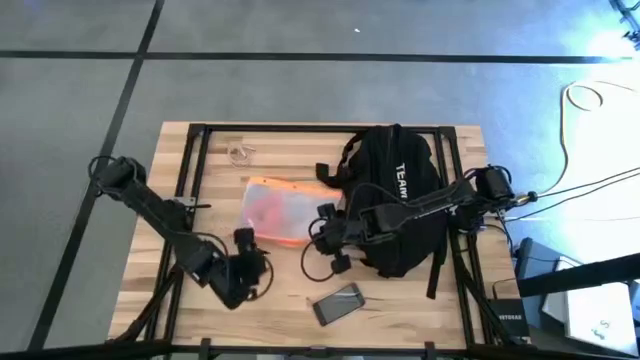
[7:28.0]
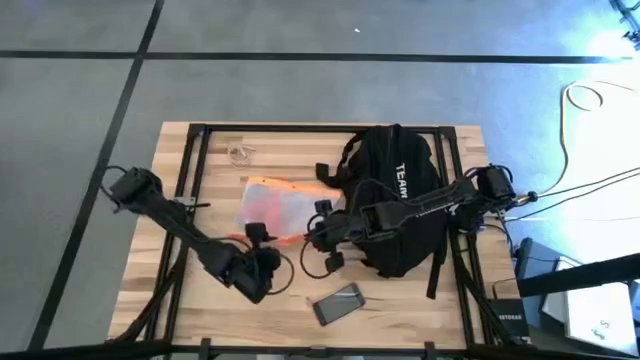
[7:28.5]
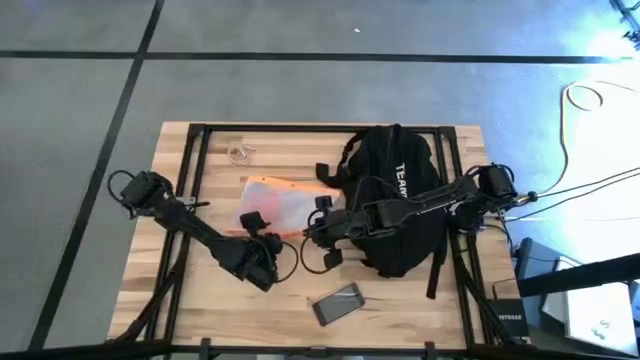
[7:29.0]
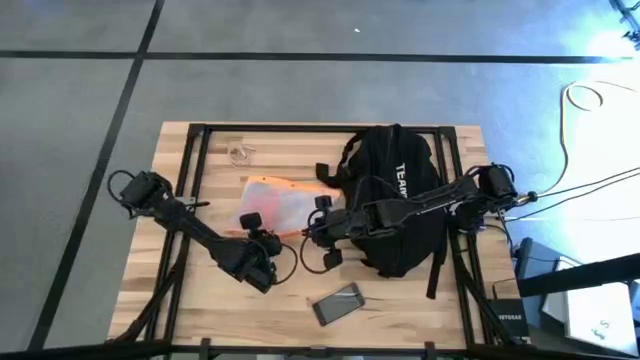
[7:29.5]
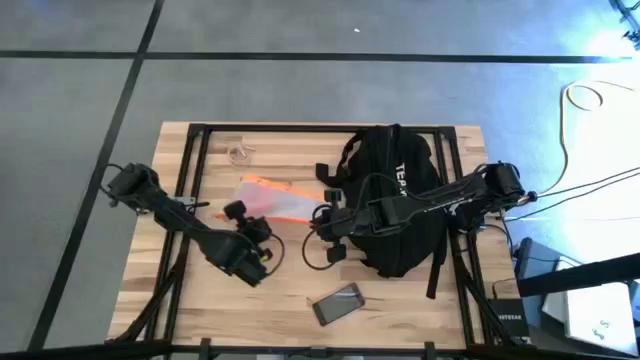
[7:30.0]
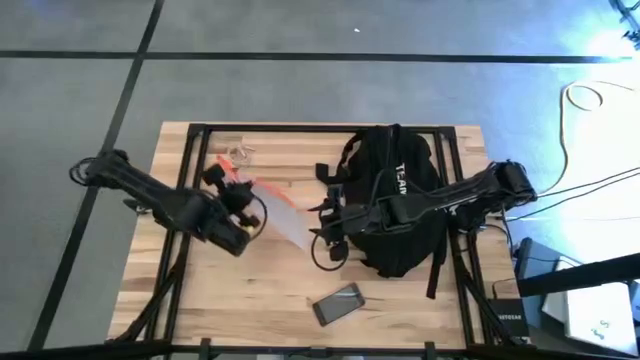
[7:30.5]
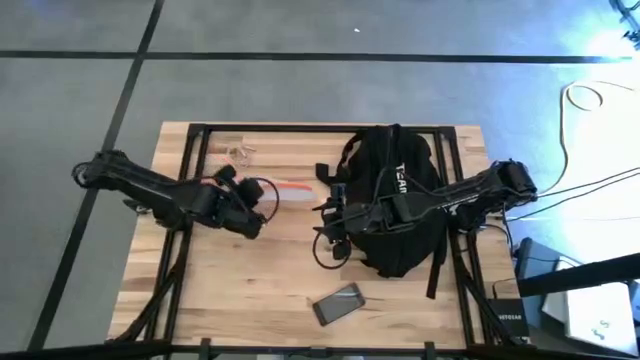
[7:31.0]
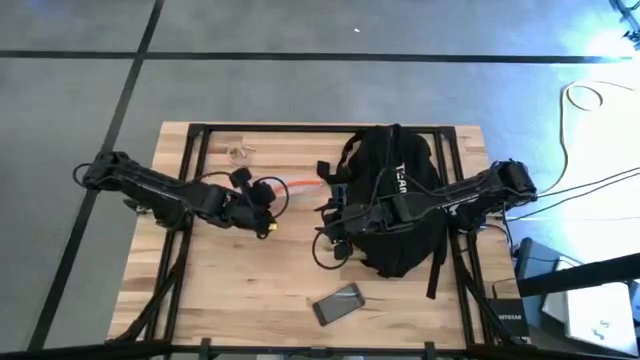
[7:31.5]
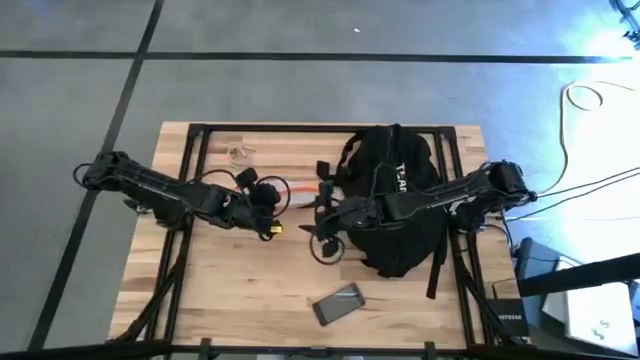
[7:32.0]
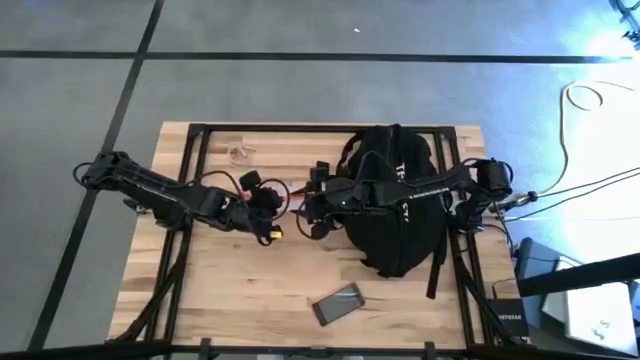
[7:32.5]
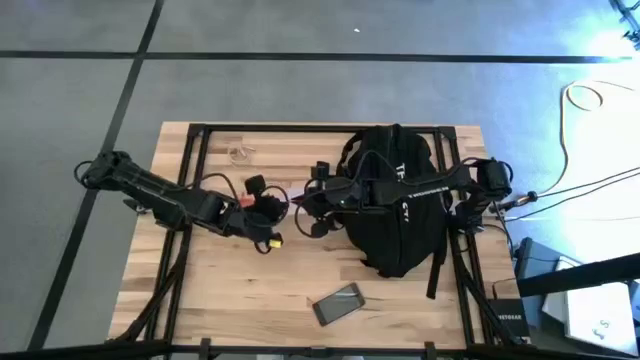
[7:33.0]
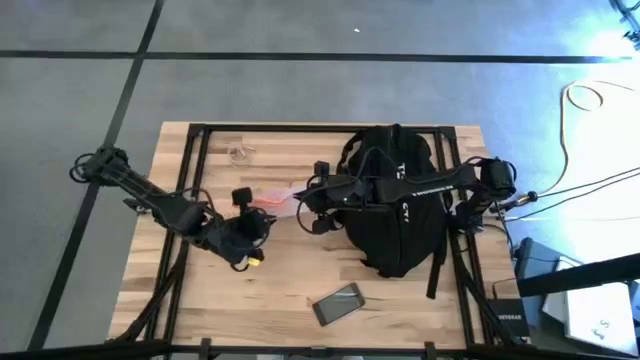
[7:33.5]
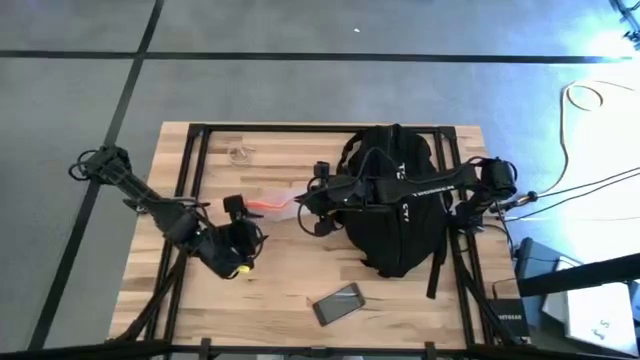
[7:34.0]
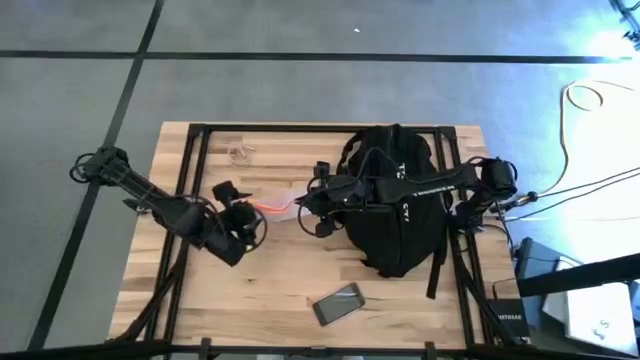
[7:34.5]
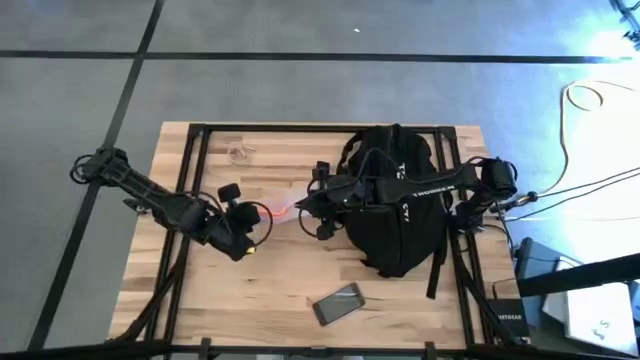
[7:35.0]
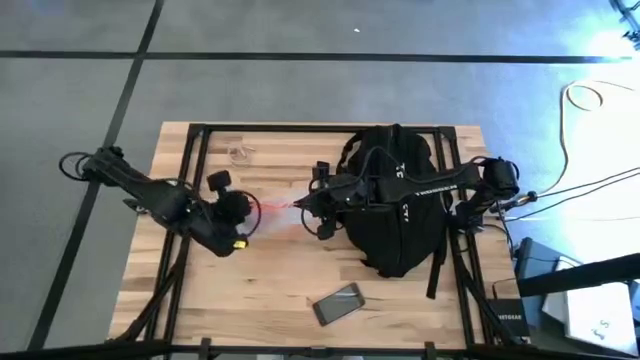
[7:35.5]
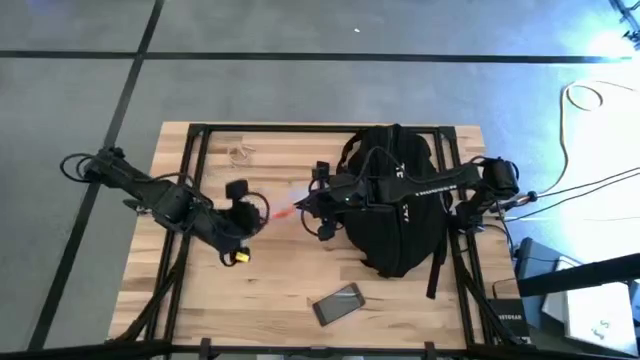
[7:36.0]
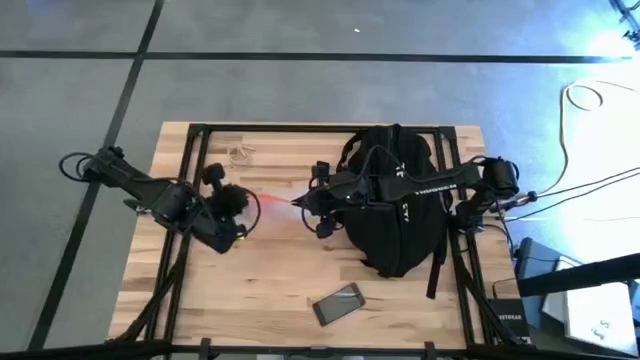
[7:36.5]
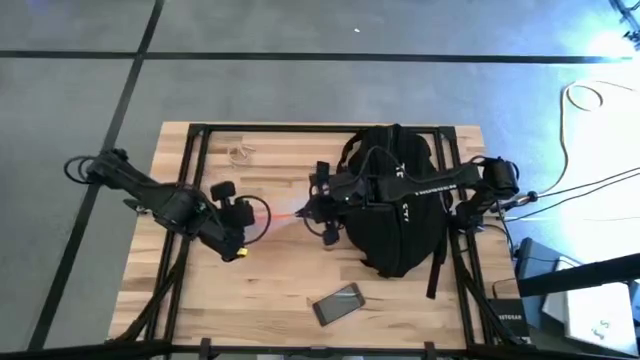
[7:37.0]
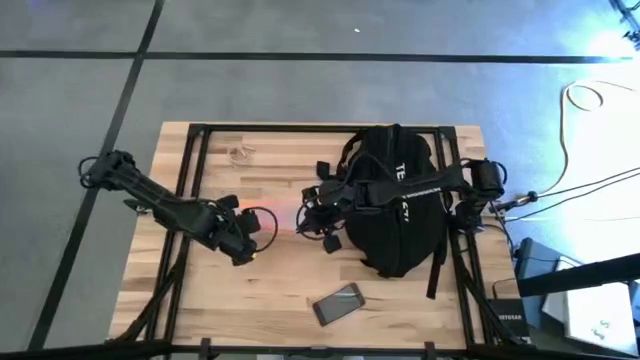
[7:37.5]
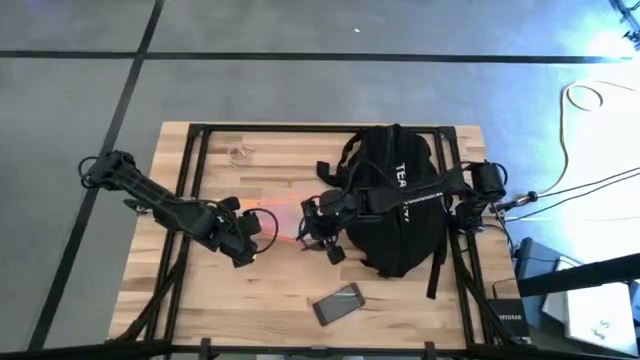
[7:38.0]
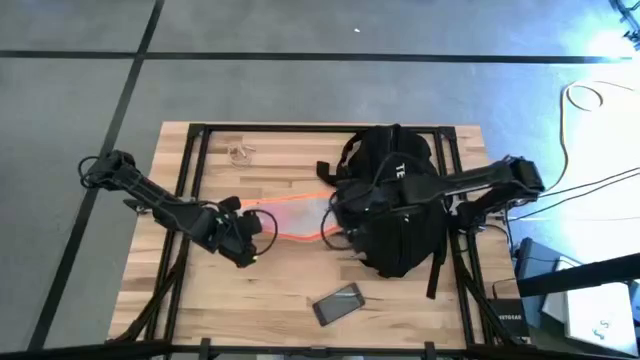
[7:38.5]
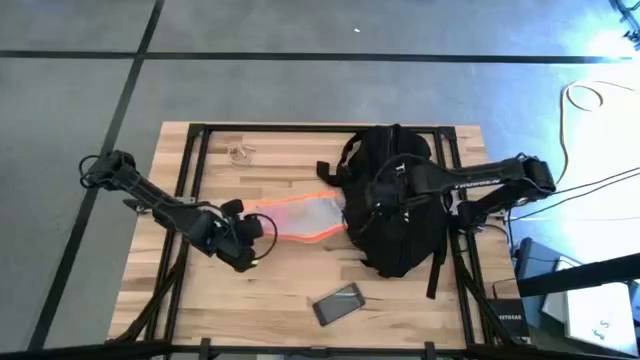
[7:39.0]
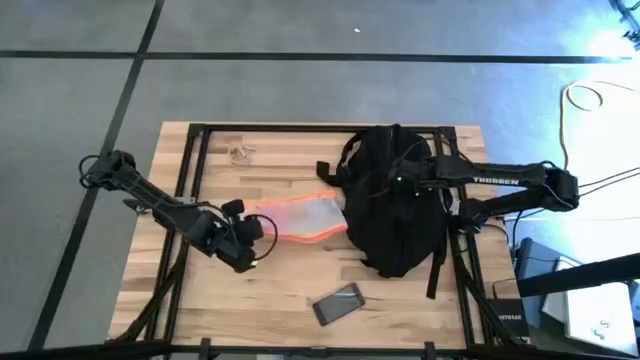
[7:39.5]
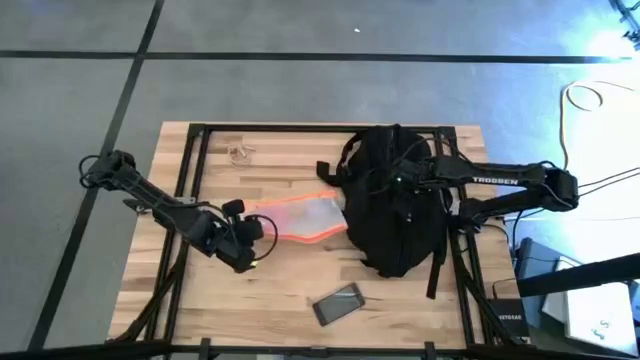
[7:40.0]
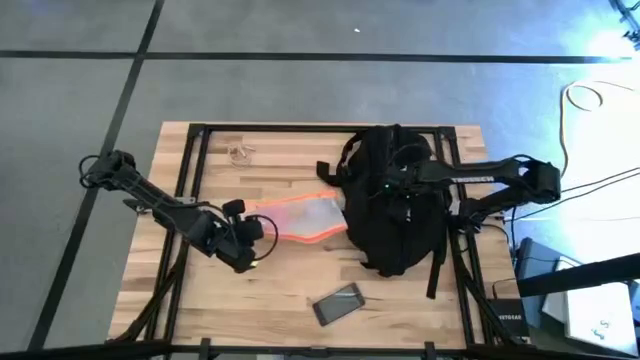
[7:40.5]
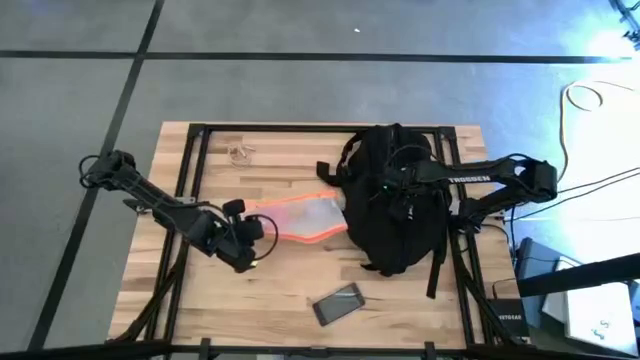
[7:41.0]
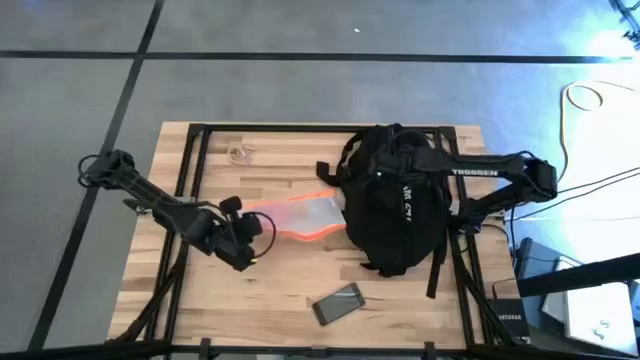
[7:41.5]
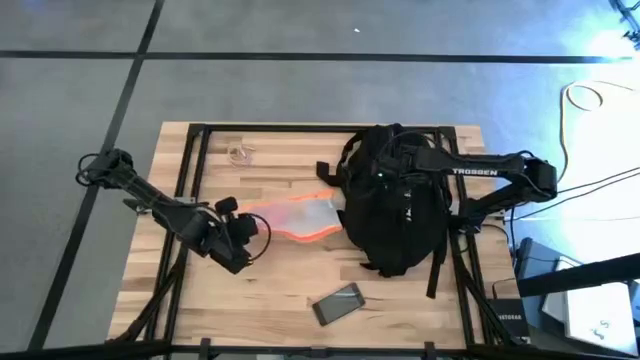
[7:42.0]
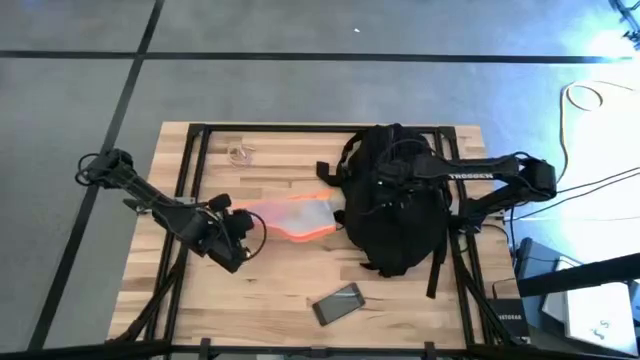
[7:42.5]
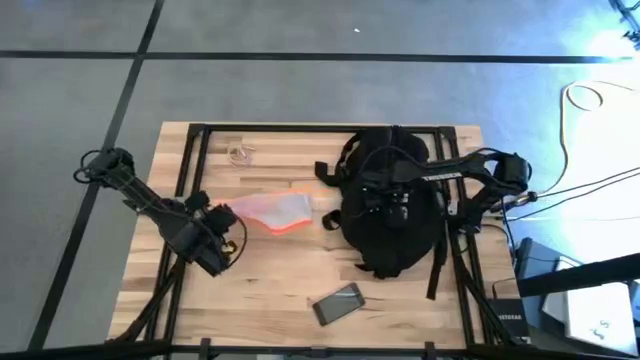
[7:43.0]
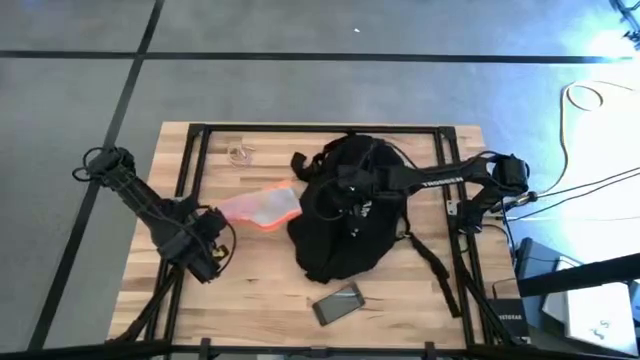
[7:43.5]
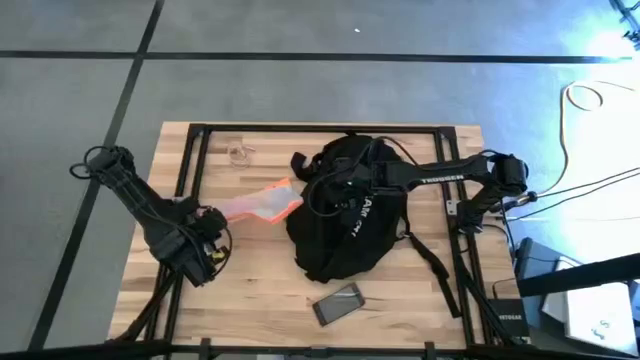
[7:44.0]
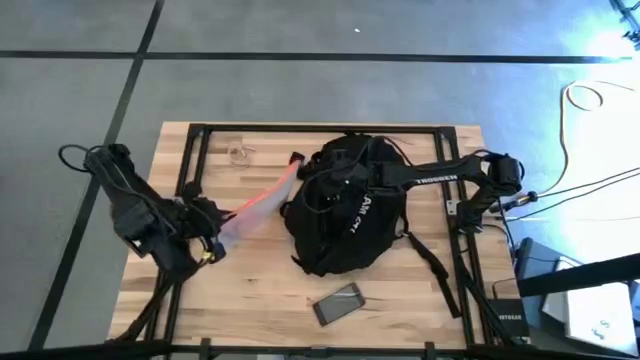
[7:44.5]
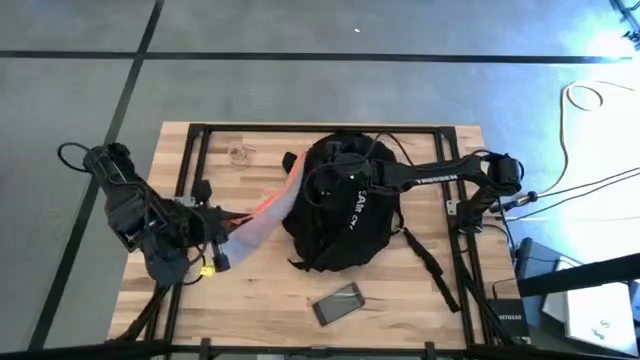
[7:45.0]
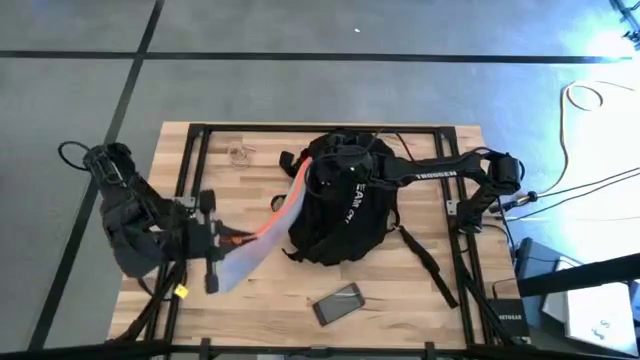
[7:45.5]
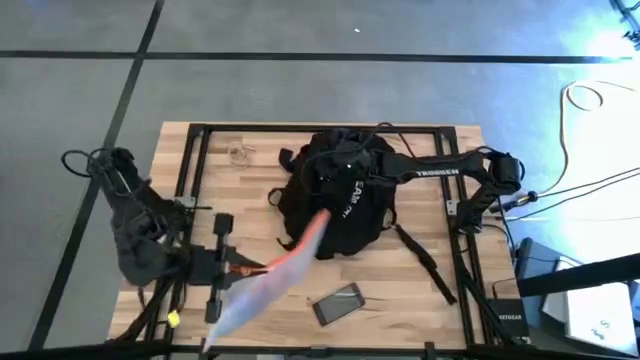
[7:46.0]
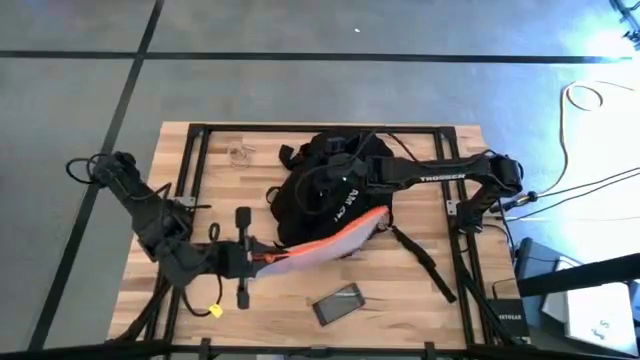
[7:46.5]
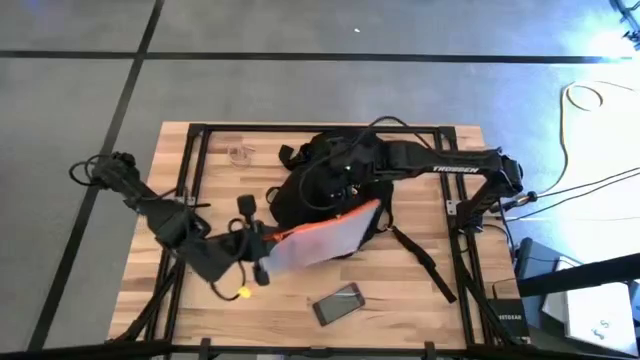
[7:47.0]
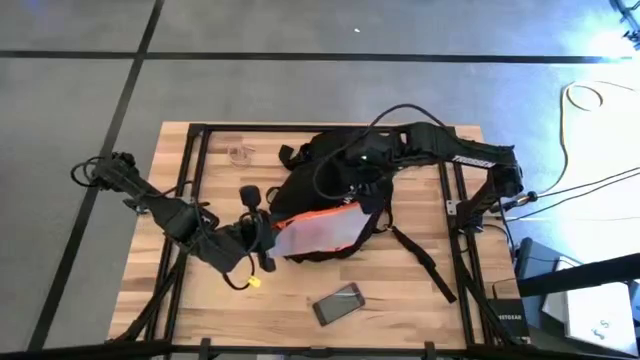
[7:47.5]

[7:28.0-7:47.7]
Task: Unpack backpack
Put the transparent white zip bag into the black backpack

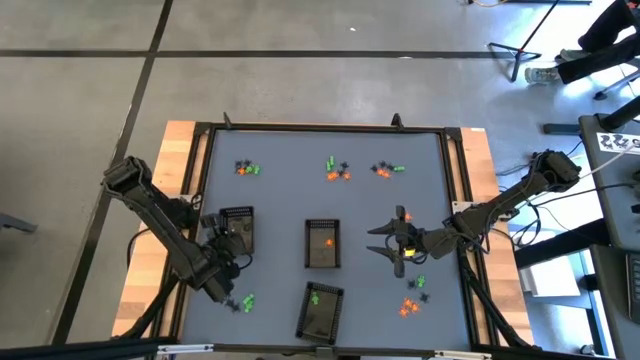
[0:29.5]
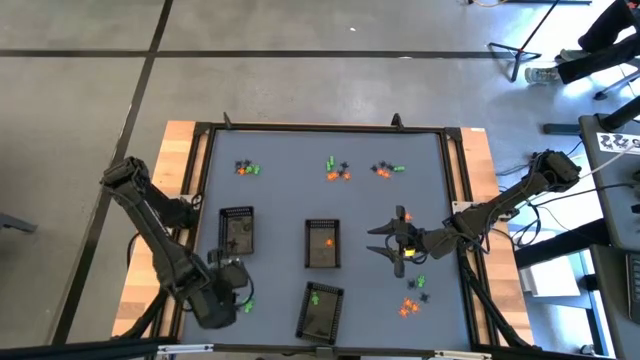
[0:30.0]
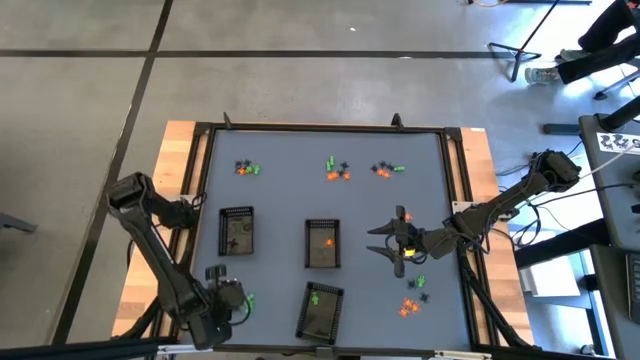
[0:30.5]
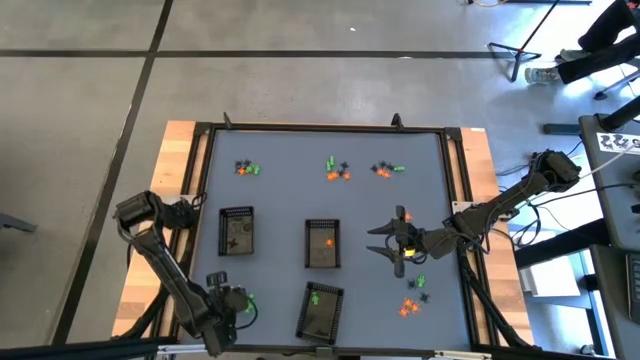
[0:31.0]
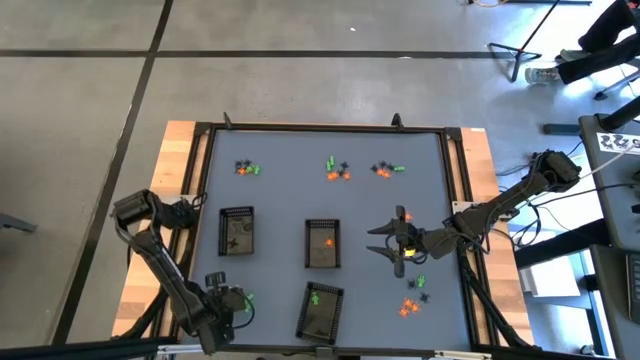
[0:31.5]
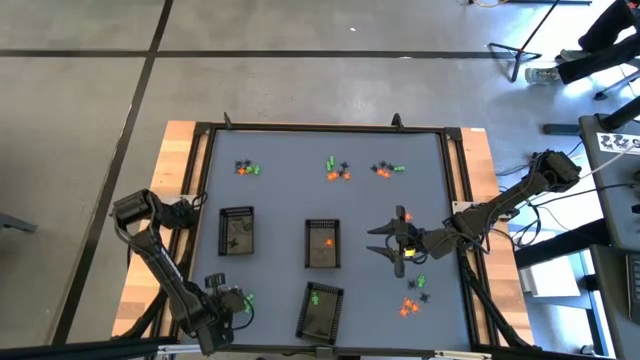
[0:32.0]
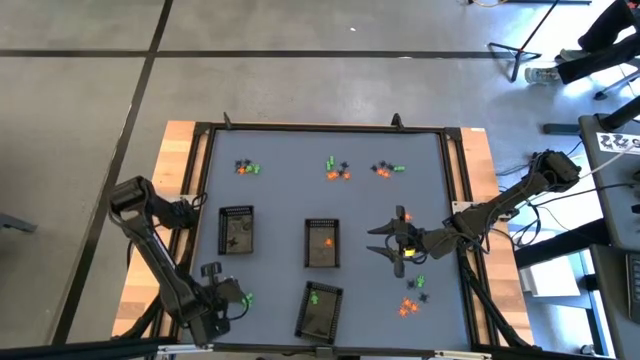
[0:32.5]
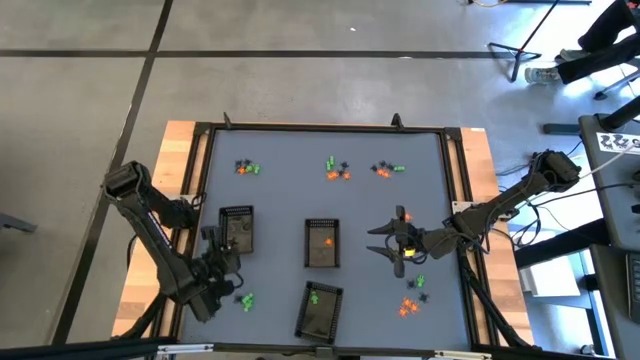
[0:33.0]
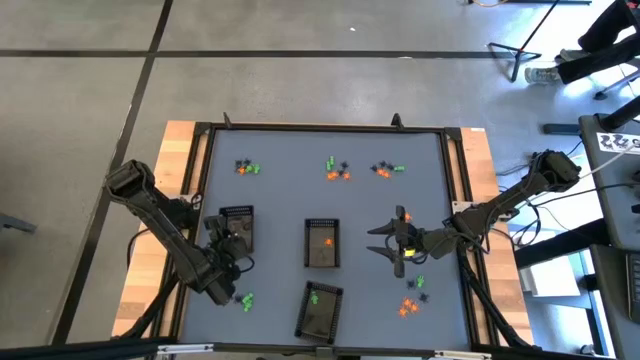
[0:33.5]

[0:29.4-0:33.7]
Task: Sort Halloween decoration
Put the black spider toy into the top left black basket
